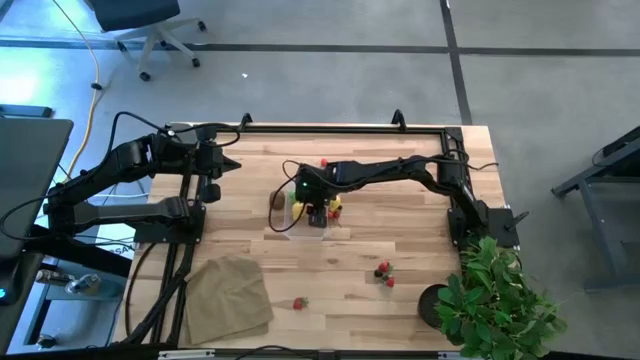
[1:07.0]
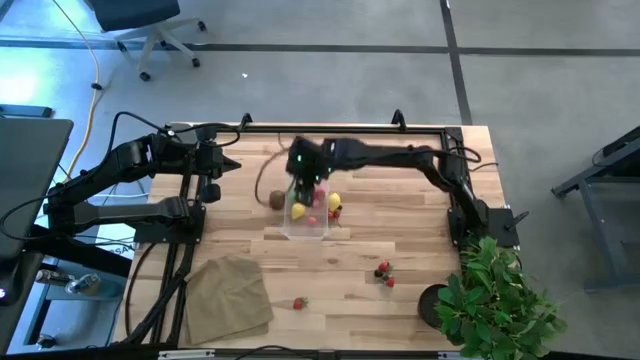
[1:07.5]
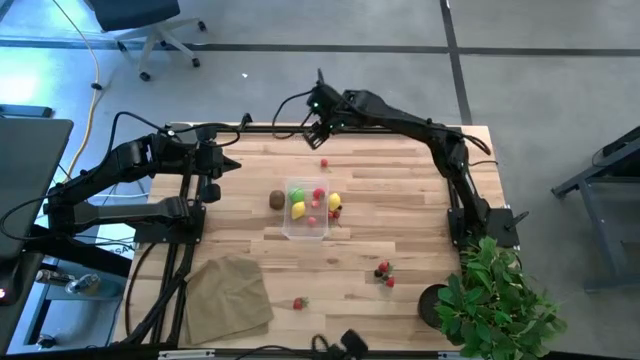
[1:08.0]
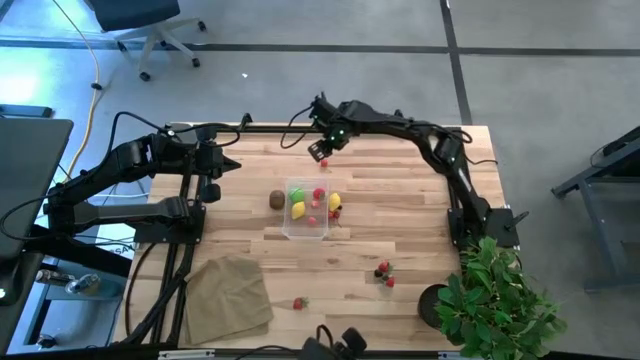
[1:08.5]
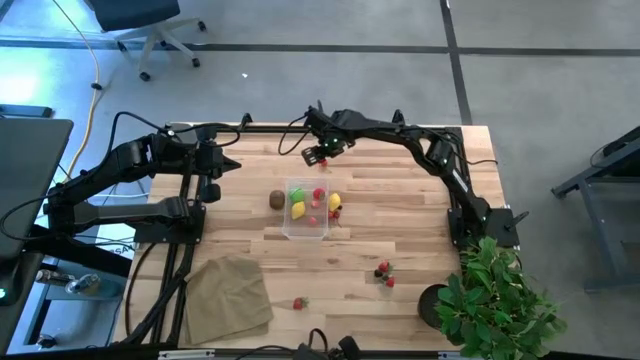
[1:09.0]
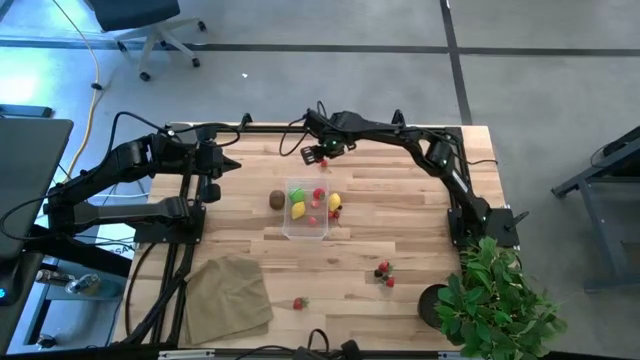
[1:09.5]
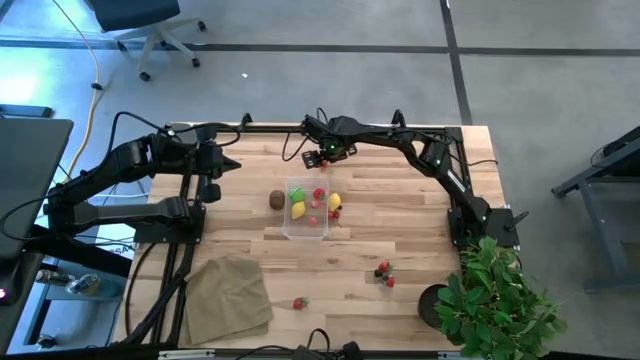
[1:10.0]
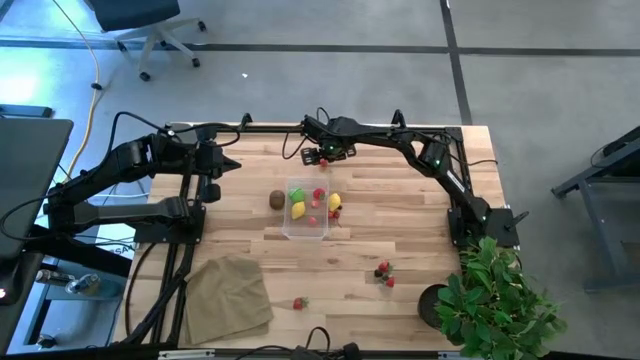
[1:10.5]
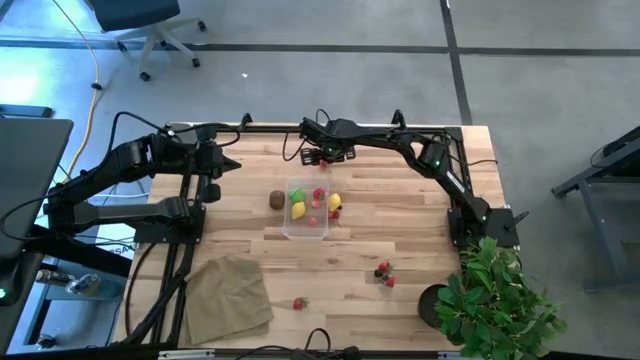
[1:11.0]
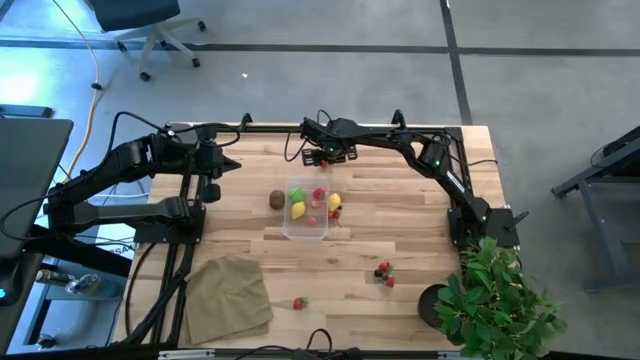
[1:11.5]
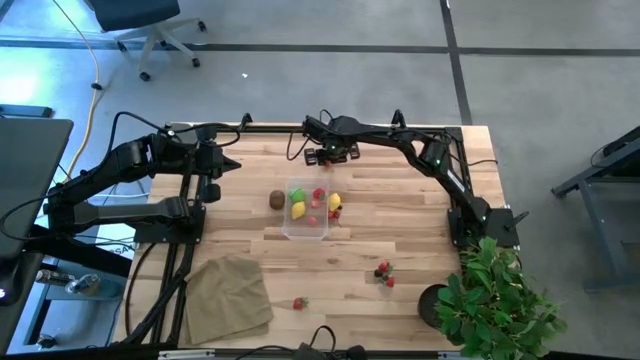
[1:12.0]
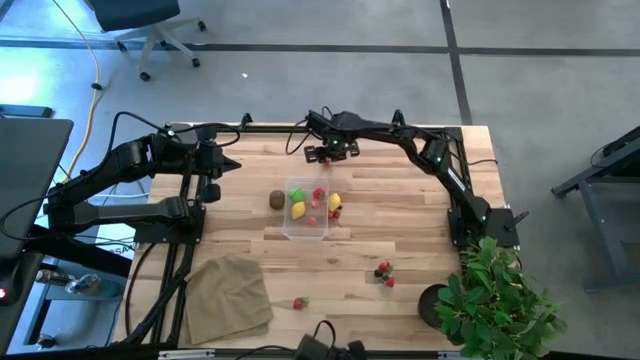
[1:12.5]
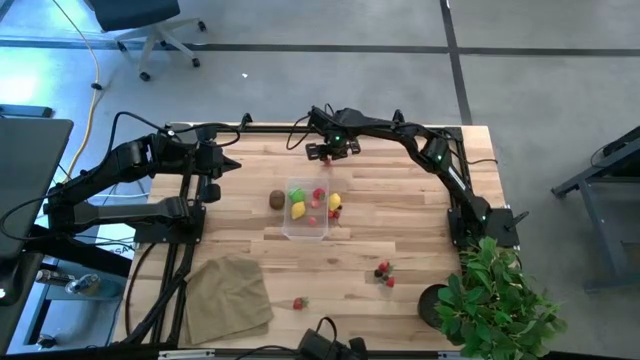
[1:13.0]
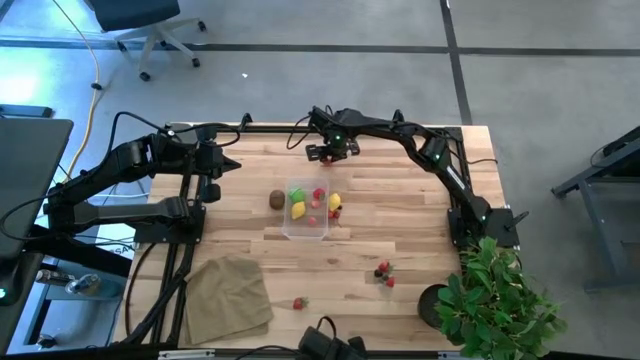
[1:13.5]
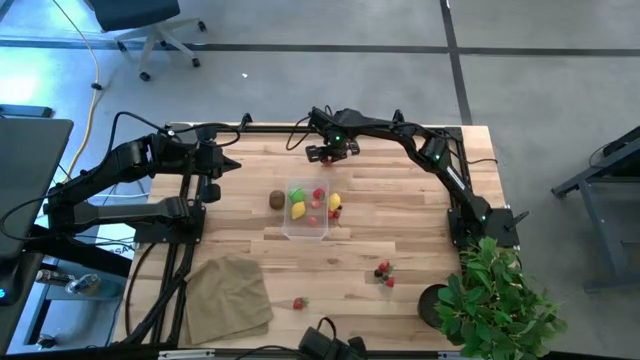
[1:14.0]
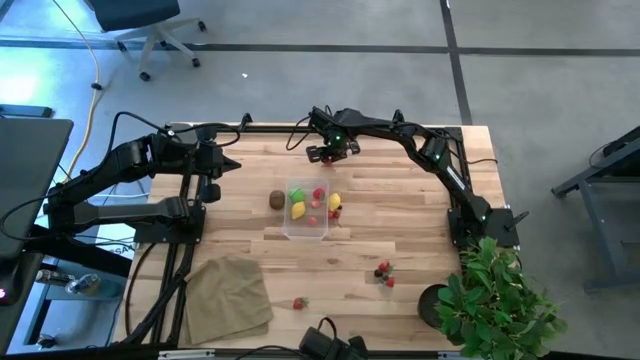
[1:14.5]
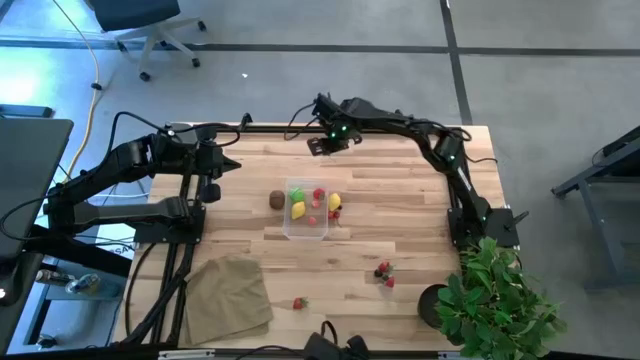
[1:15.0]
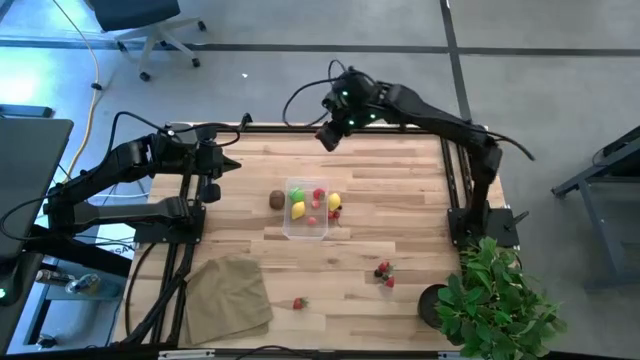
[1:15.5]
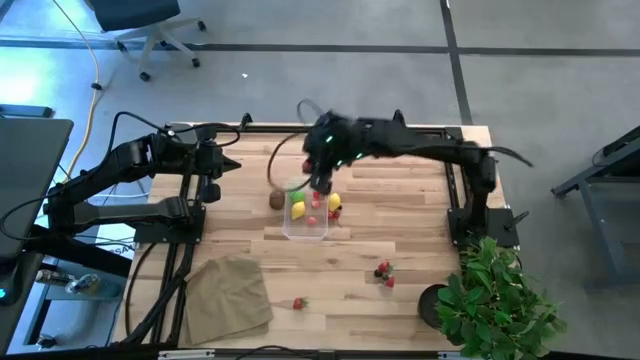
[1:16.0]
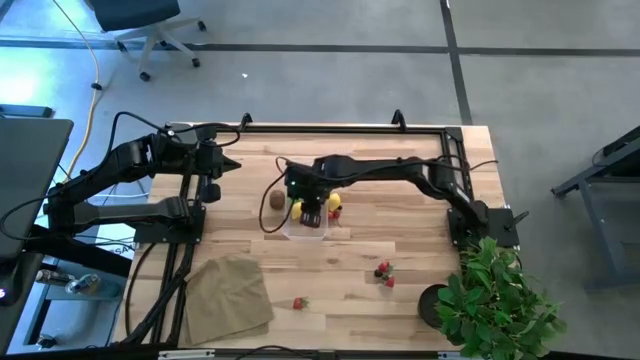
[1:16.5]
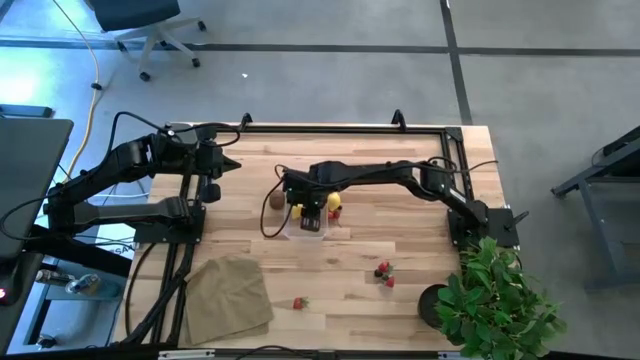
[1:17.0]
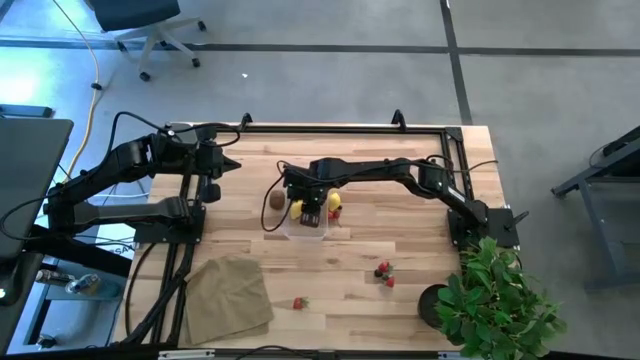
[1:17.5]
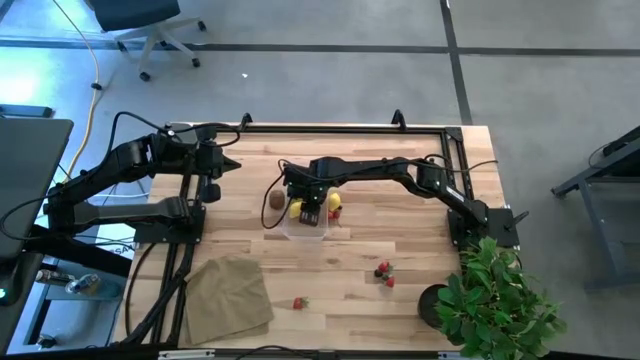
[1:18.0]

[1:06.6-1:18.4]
Task: Pick and placing Produce into tupperware
Put the cherry into the transparent bin

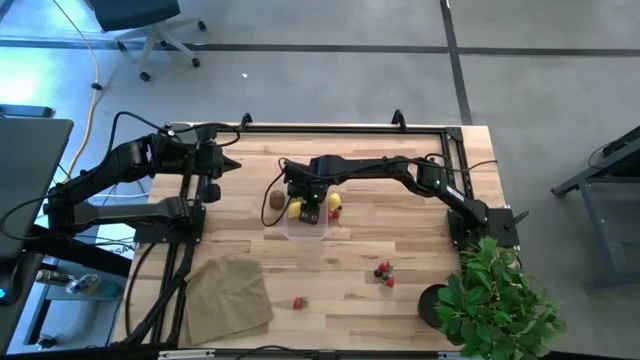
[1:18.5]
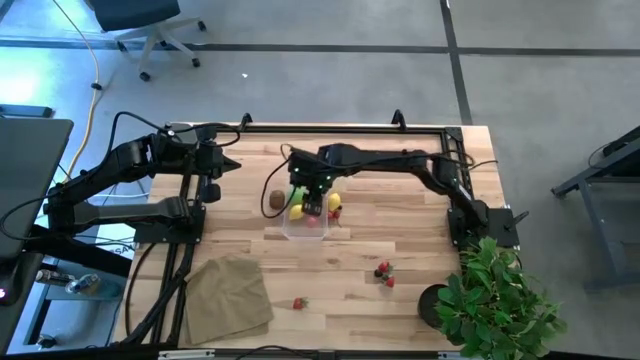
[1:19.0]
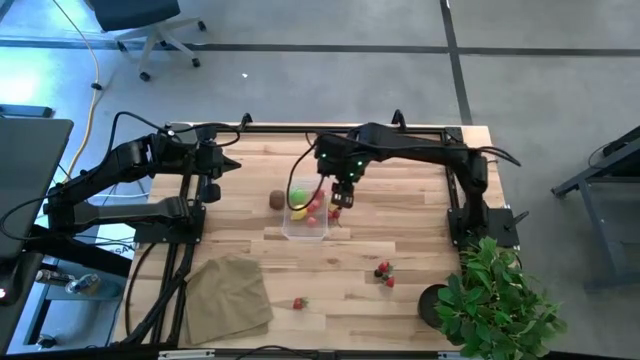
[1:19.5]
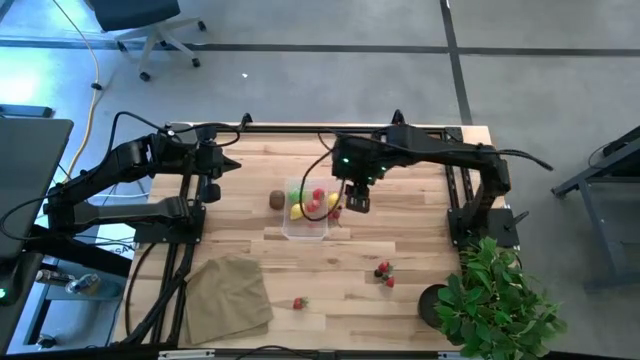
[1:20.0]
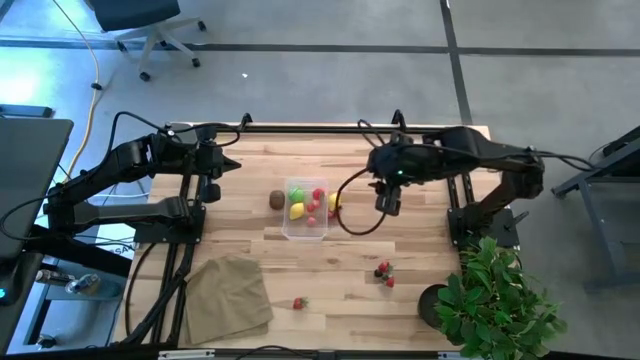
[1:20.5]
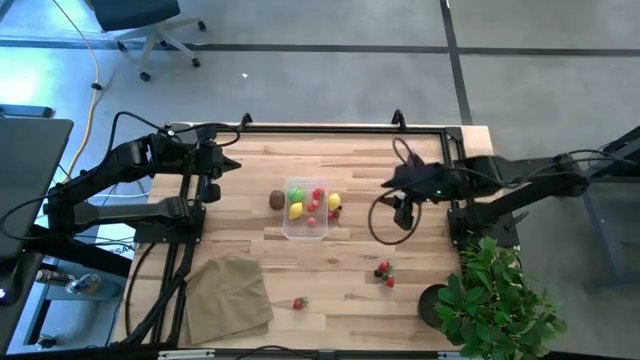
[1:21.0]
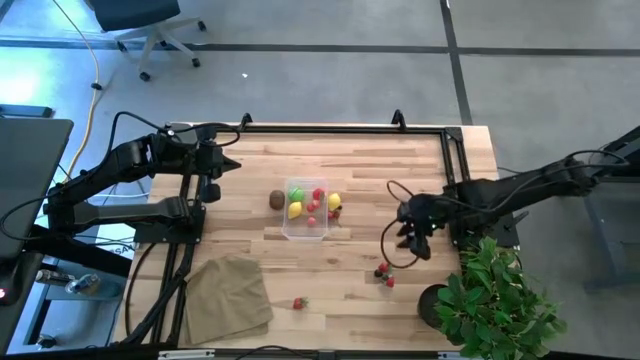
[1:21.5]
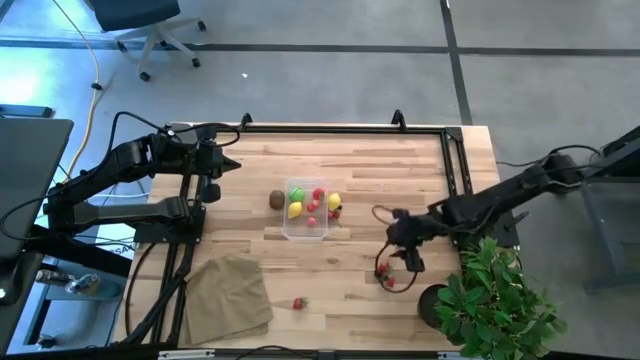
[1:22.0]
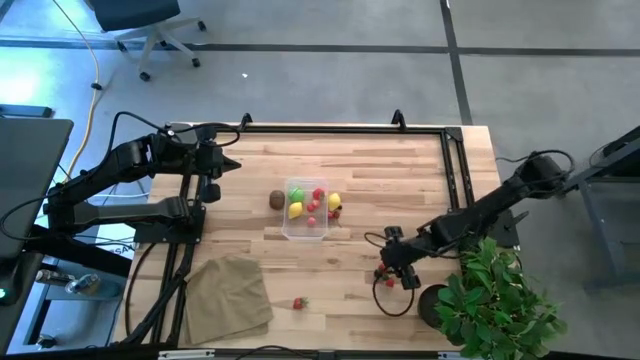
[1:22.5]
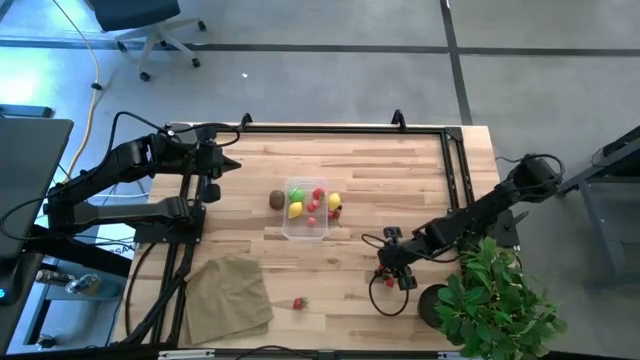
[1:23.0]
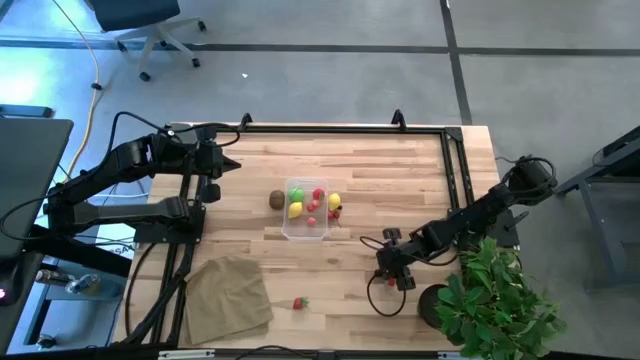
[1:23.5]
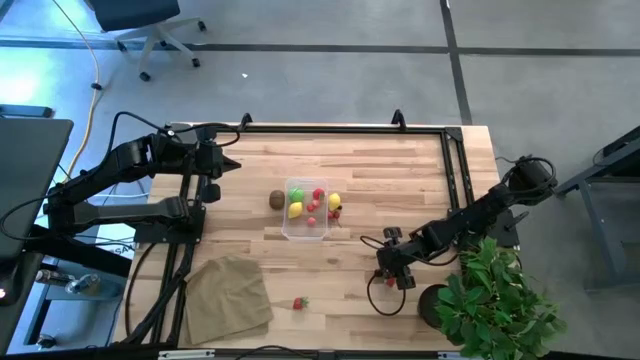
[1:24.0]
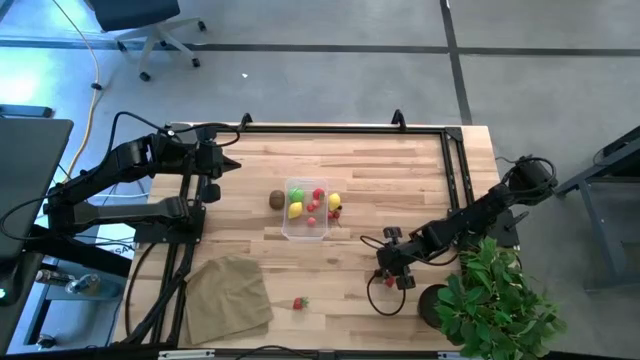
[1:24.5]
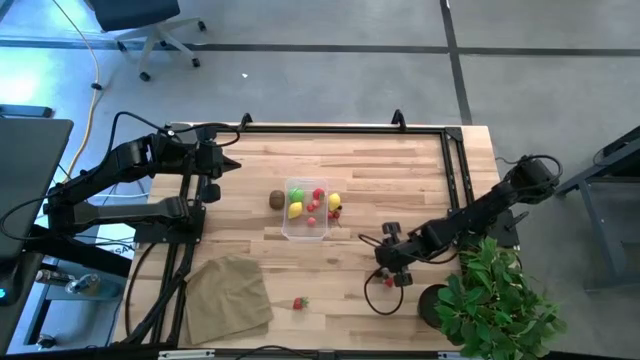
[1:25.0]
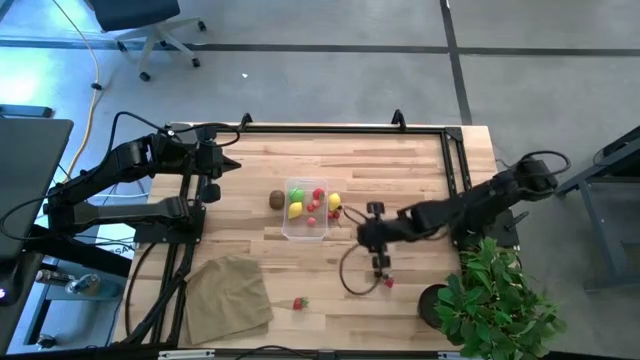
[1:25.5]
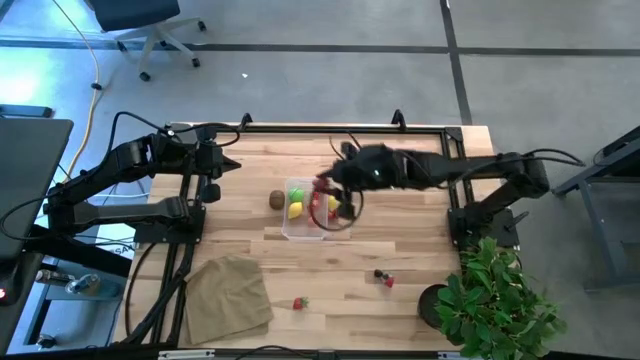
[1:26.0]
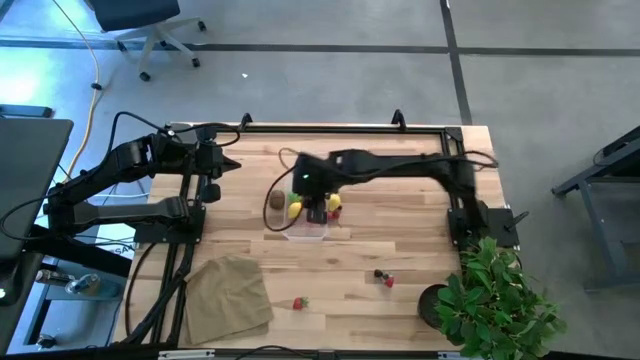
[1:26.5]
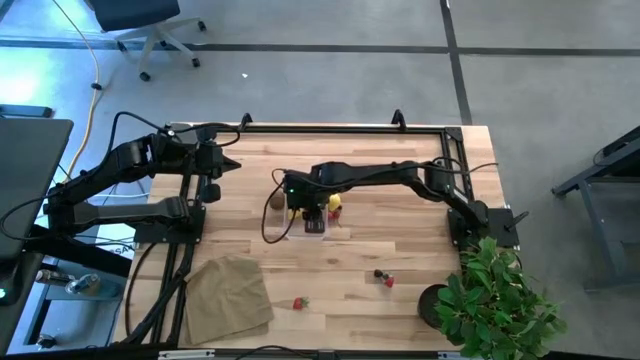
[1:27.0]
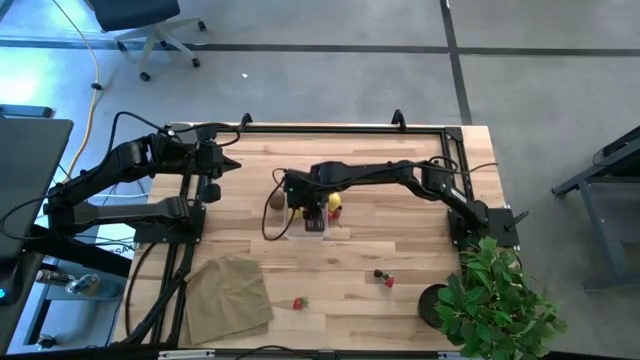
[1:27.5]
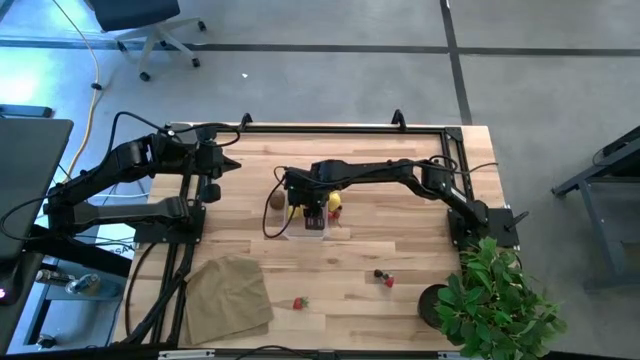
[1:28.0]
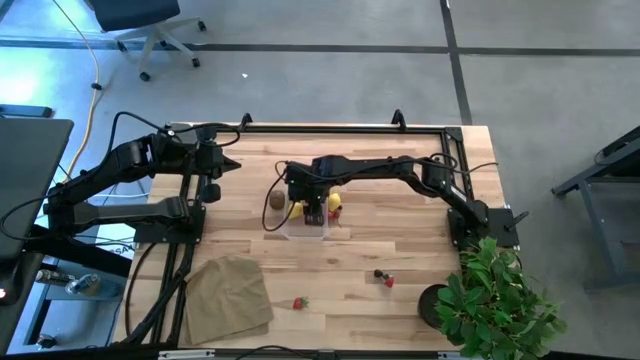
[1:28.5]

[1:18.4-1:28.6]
Put the strawberry into the transparent bin
